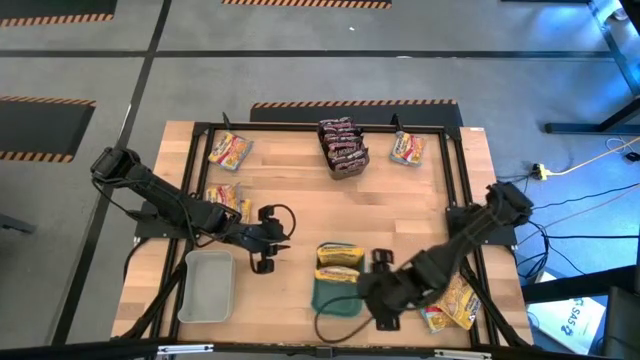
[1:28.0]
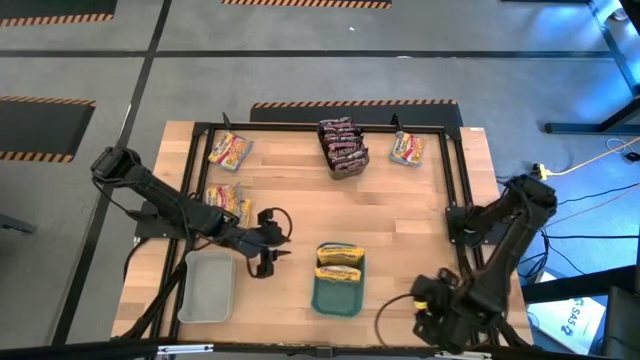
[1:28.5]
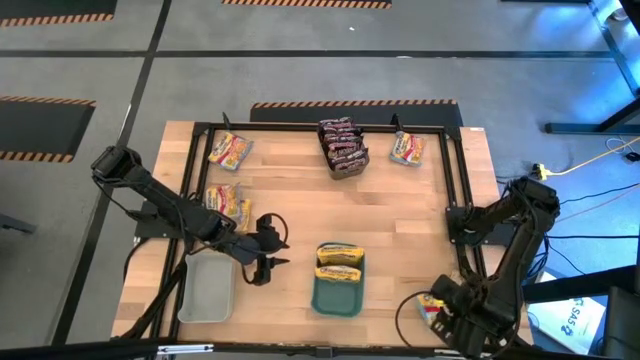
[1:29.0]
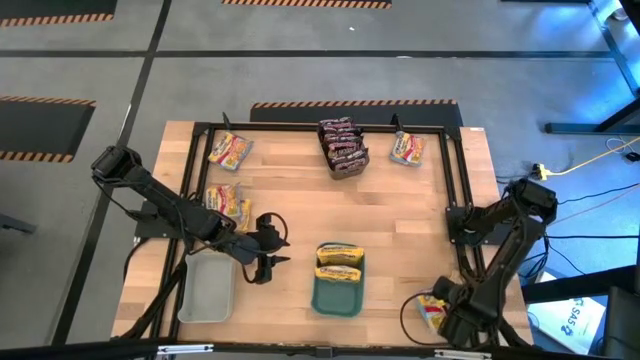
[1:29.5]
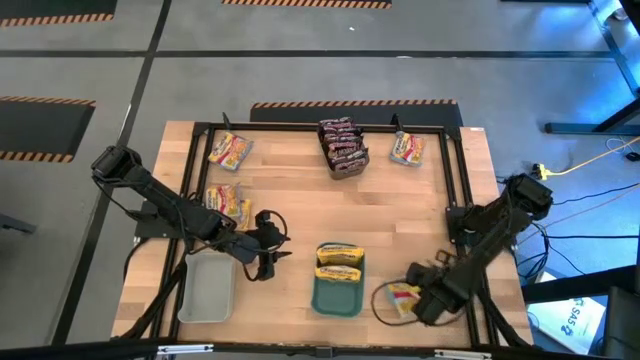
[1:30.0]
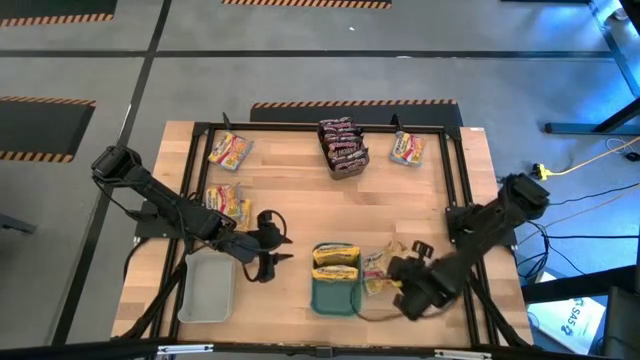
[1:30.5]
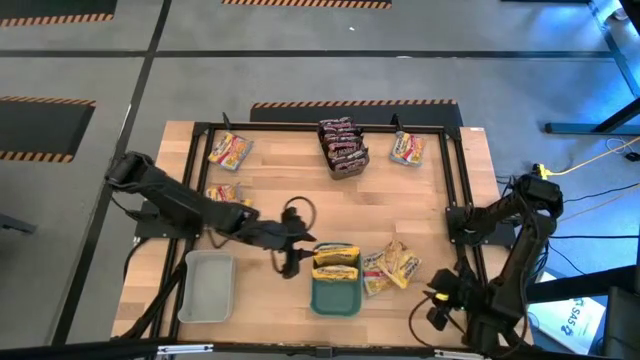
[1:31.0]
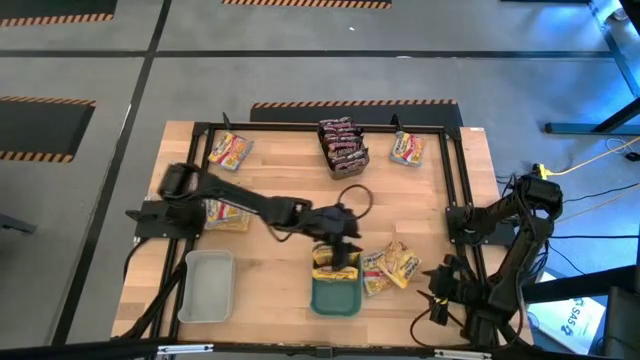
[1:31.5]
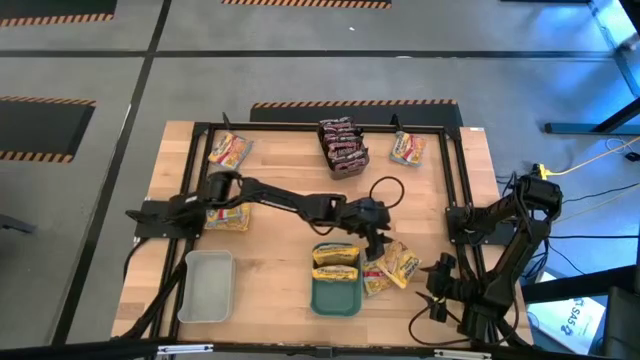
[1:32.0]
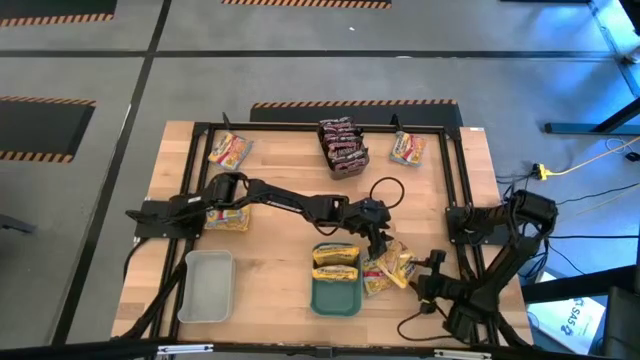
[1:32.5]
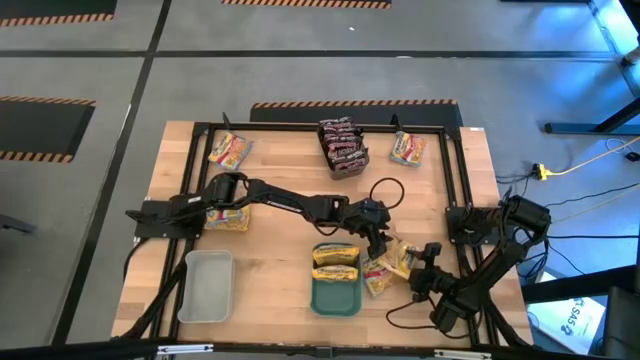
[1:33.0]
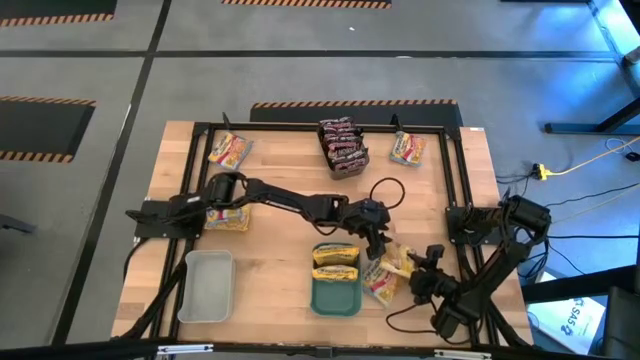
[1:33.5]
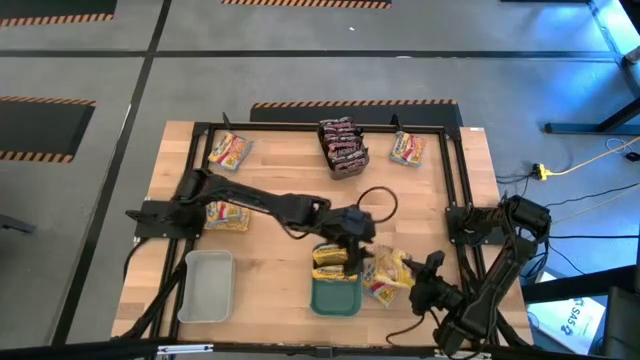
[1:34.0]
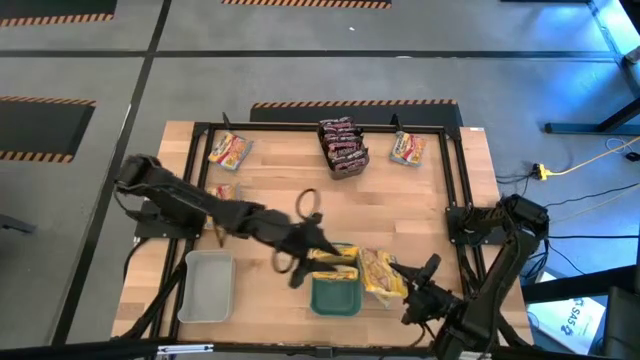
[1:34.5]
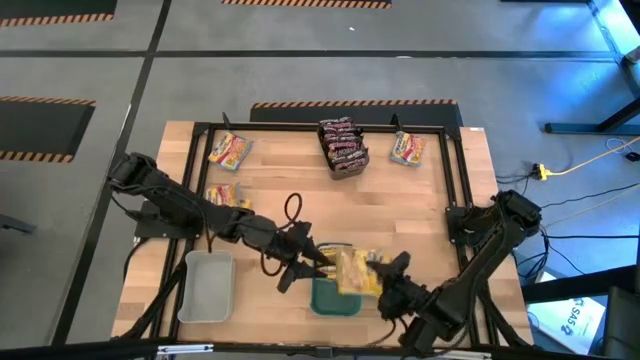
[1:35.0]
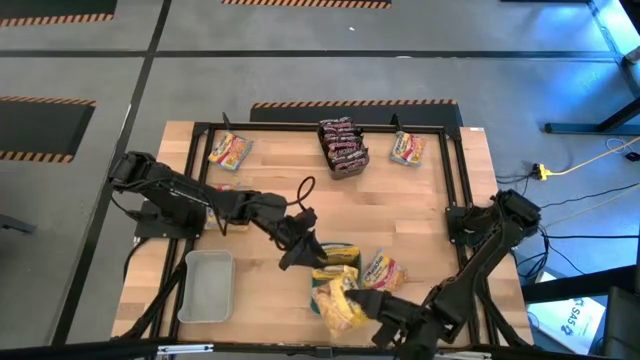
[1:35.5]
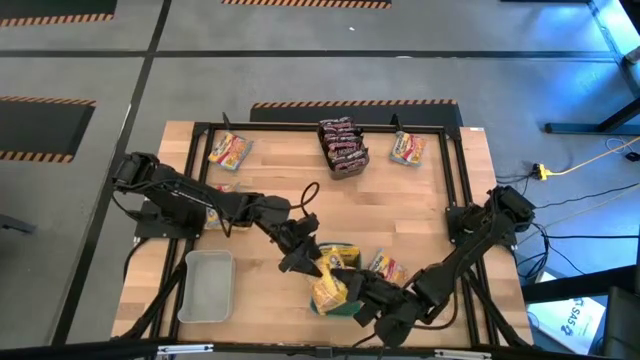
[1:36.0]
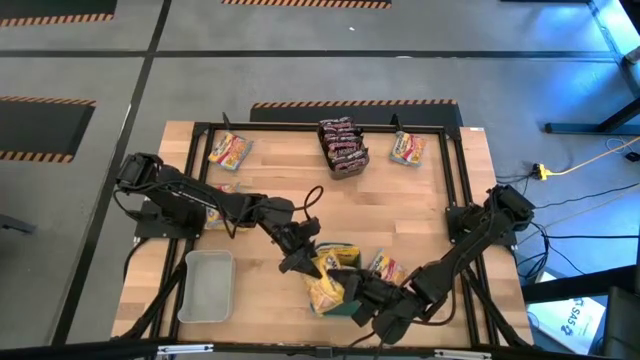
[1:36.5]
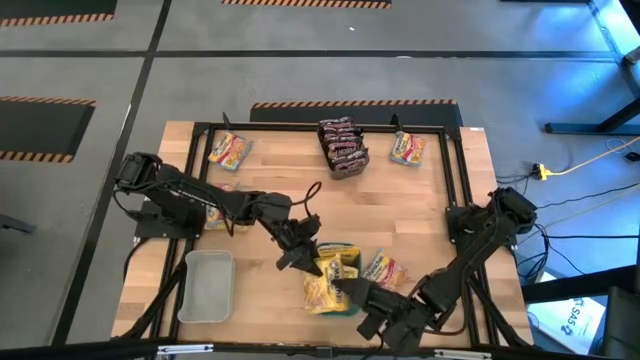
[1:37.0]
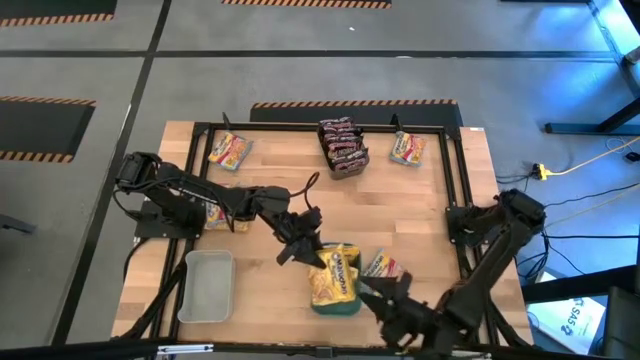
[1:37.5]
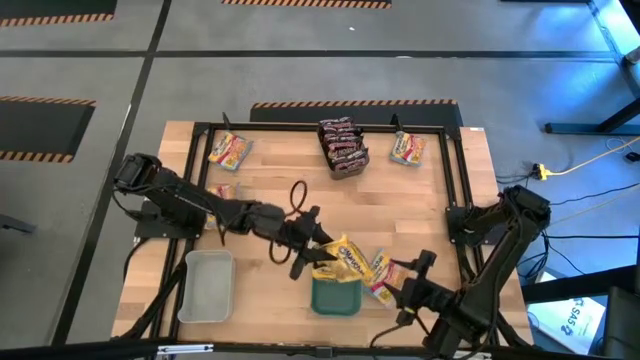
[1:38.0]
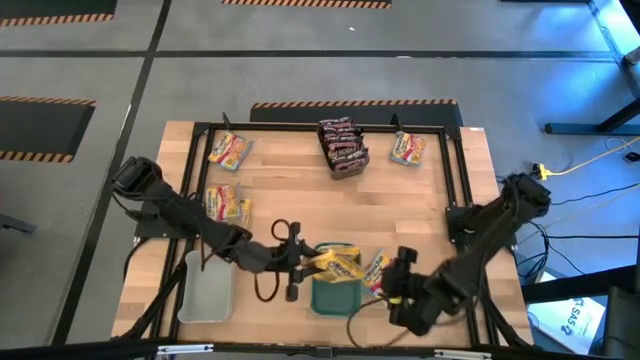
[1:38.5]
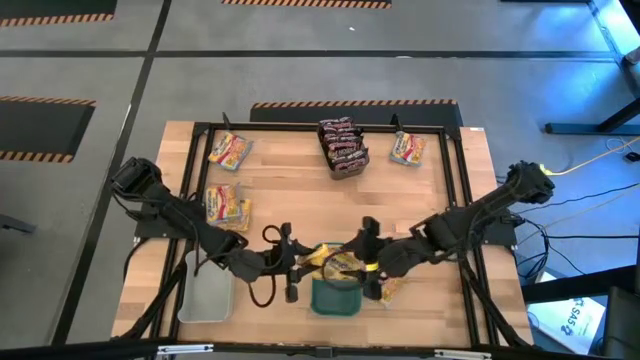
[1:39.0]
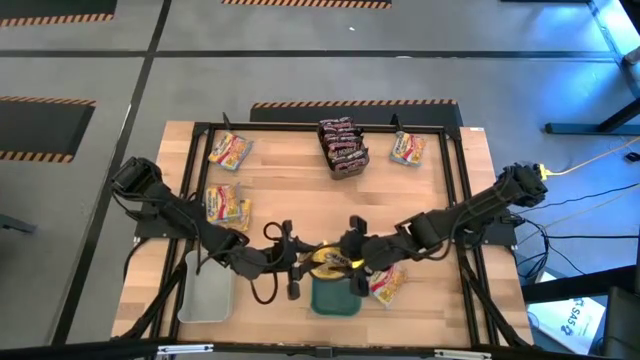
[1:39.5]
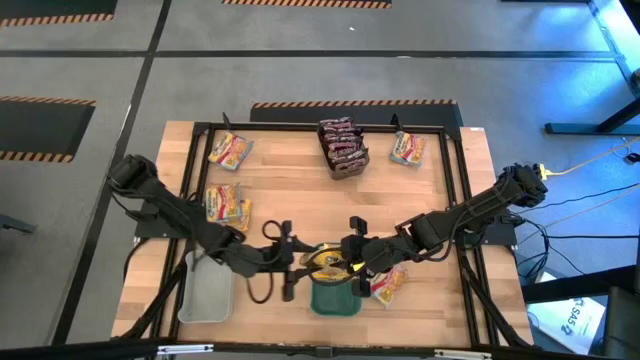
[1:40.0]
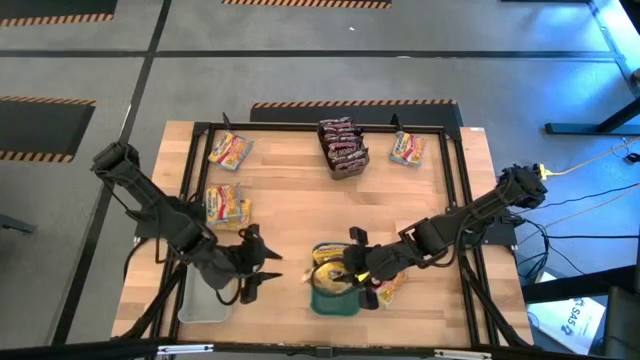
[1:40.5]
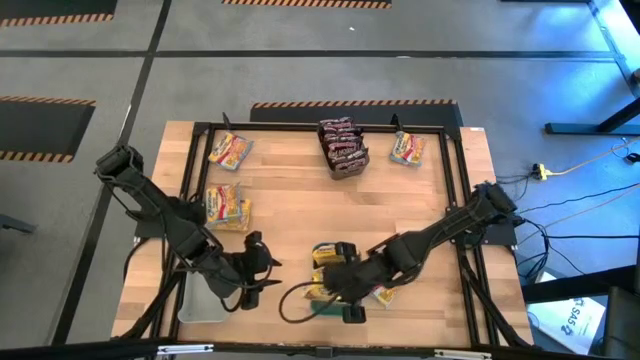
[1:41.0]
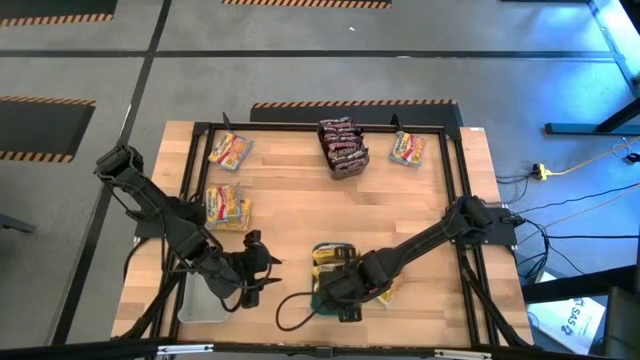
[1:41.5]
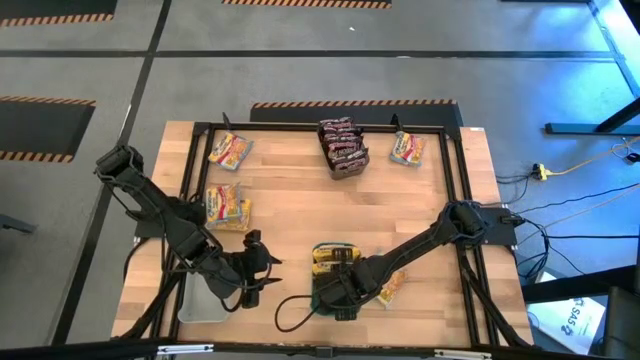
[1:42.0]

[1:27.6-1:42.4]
Task: Sort Maruchan noodles
Put the yellow noodle pack into the green bin

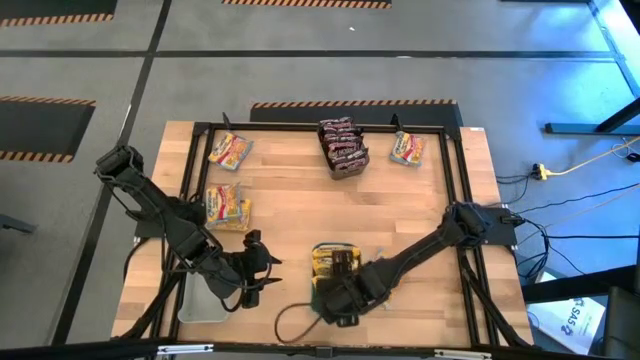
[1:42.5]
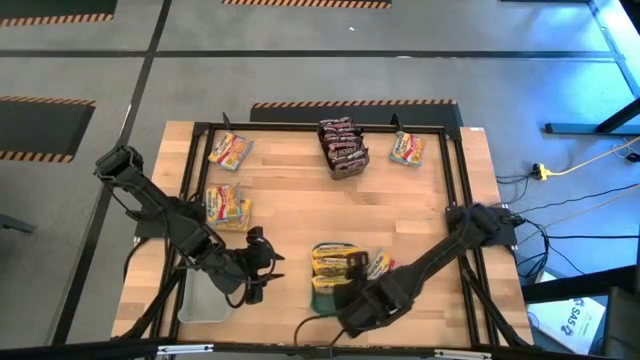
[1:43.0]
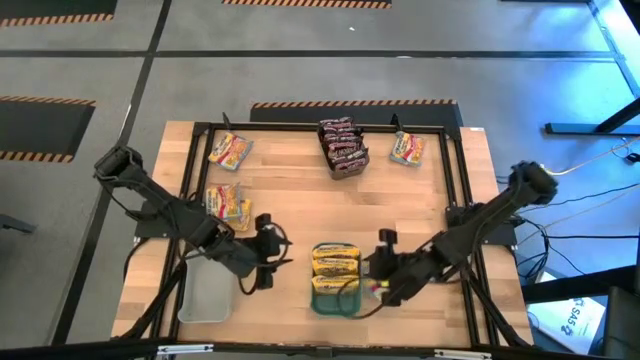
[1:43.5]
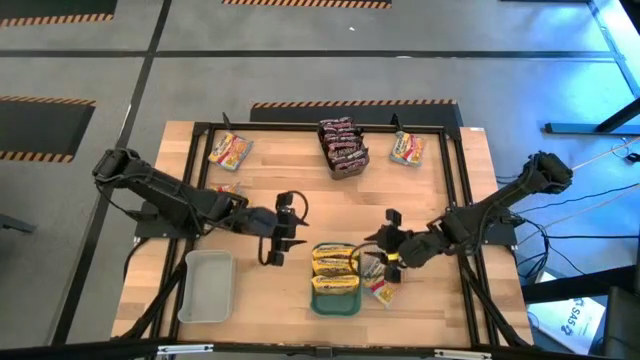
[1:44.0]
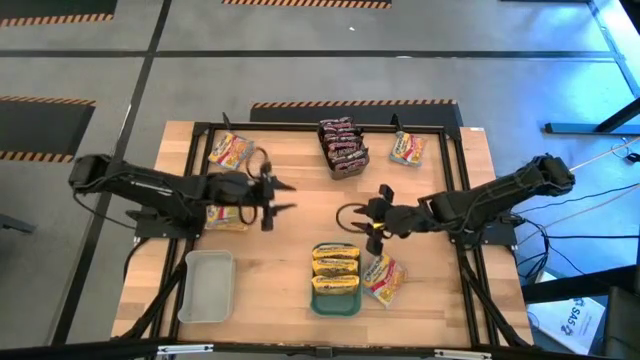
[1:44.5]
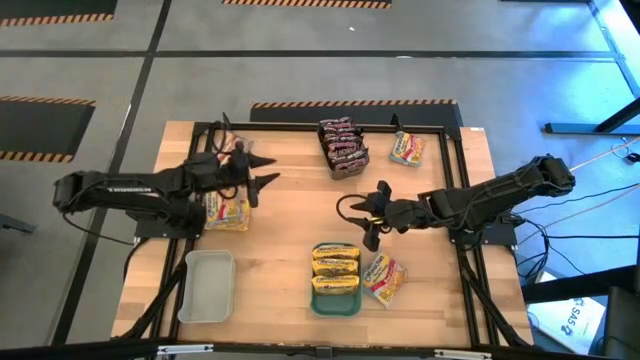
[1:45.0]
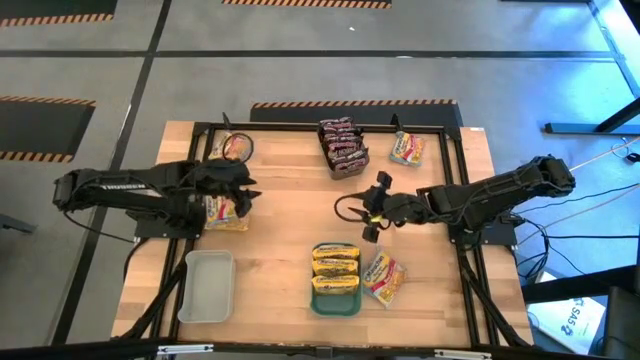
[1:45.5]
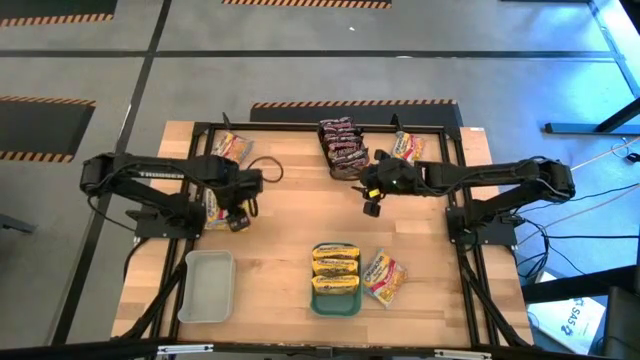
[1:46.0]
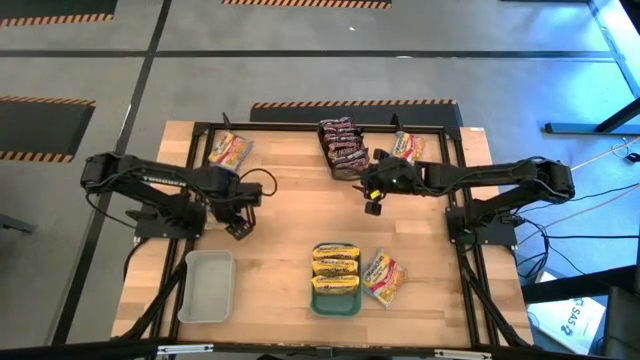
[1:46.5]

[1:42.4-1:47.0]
Adjust the blue noodle pack on the table

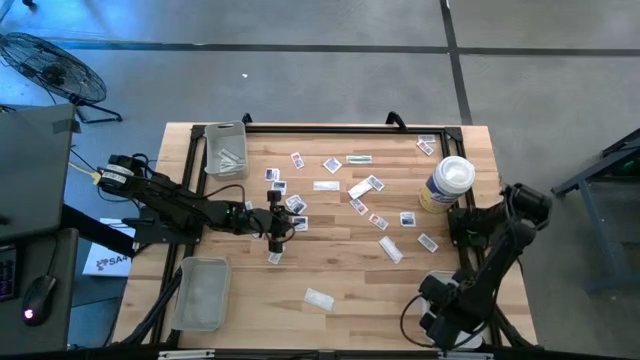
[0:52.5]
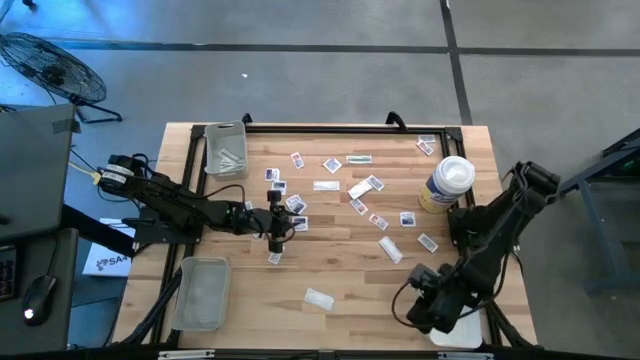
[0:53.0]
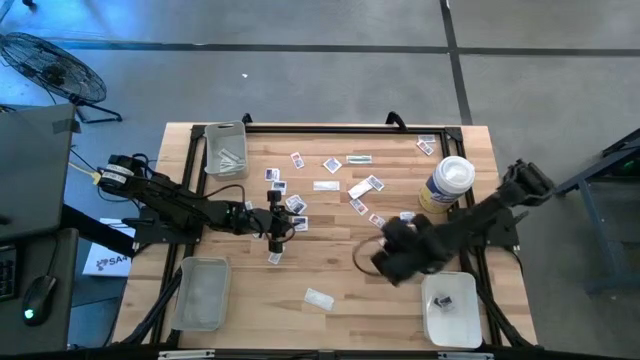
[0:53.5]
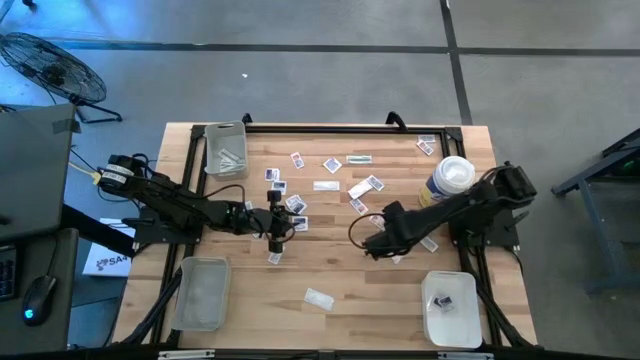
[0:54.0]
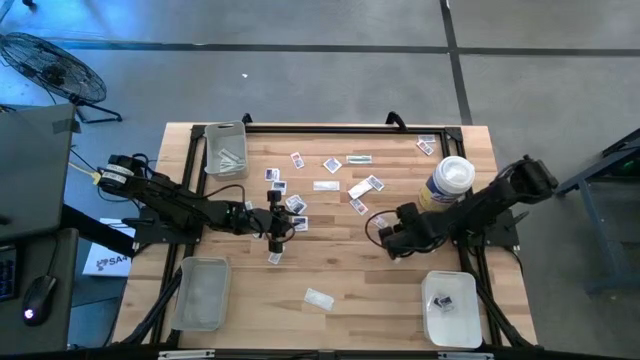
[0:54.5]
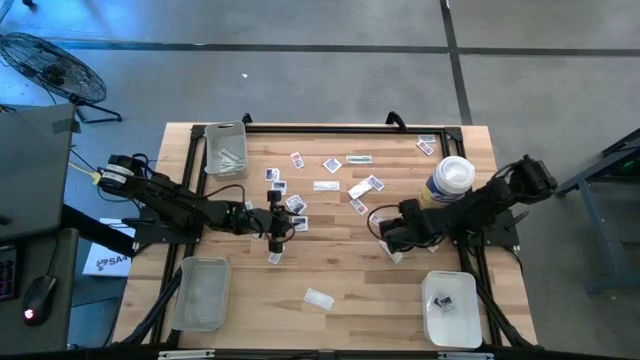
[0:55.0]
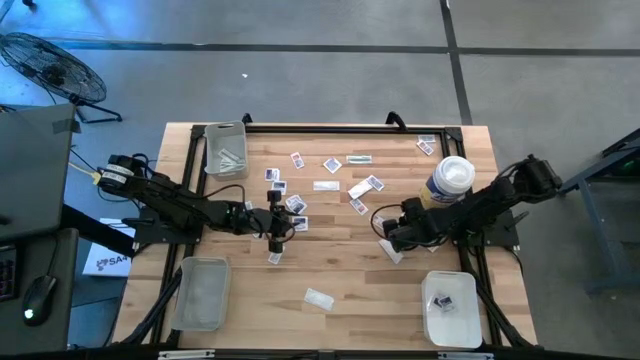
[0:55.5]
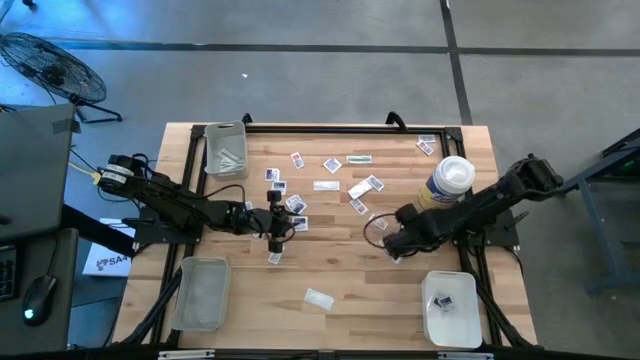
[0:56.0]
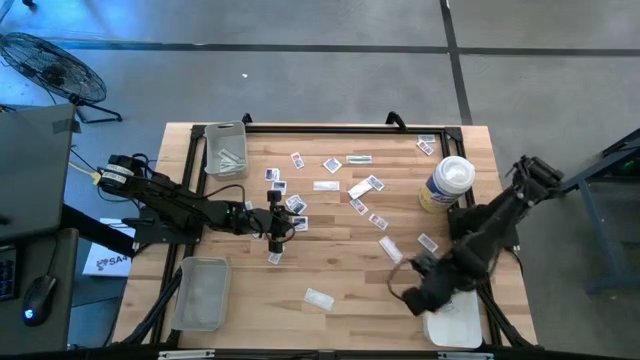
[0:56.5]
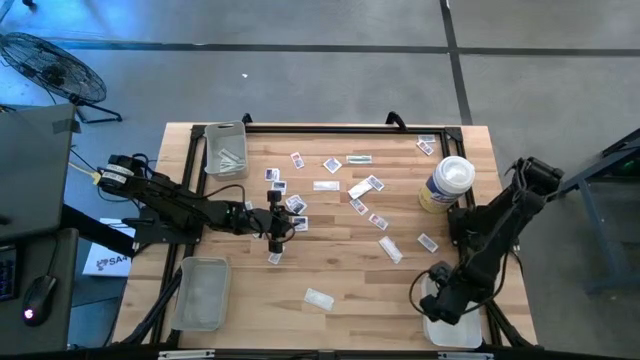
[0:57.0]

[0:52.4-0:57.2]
Task: Pick & Place First Aid Supplies
Put the blue alcohol pad into the white bin
